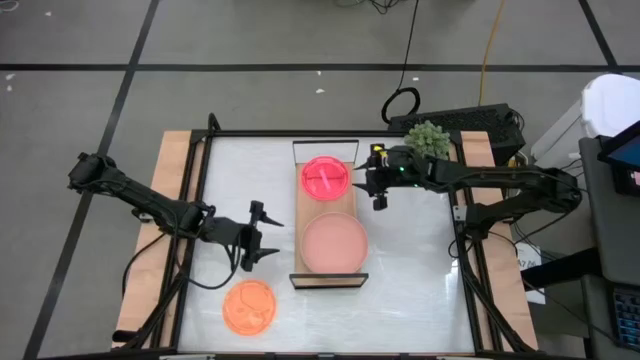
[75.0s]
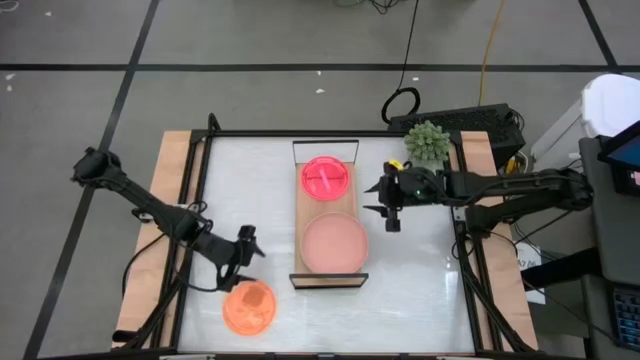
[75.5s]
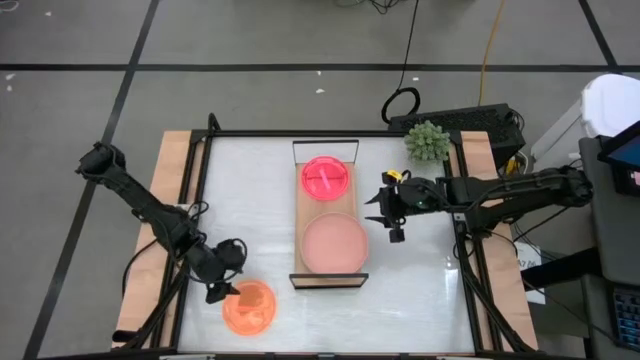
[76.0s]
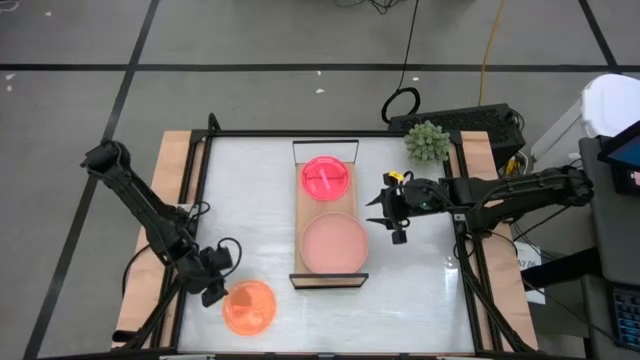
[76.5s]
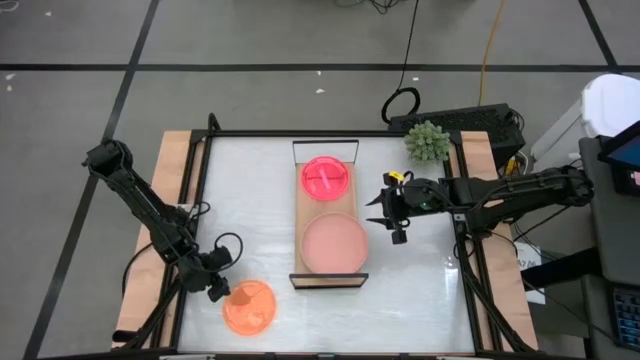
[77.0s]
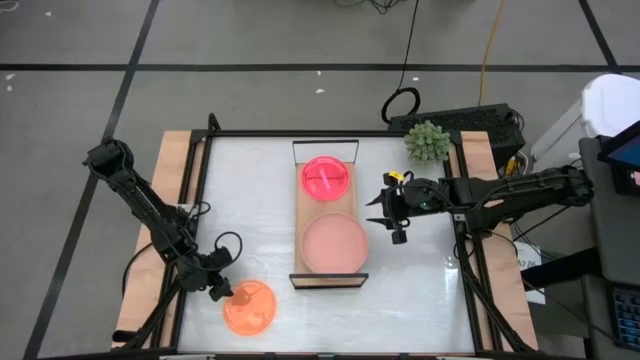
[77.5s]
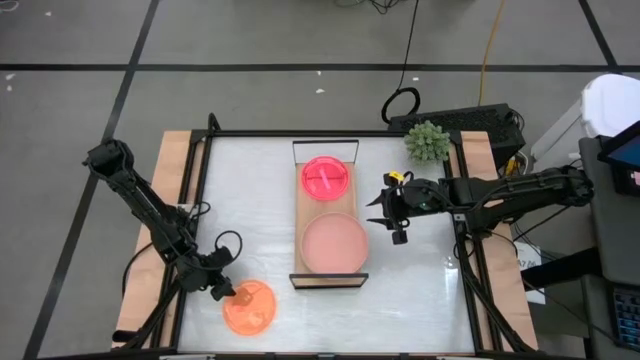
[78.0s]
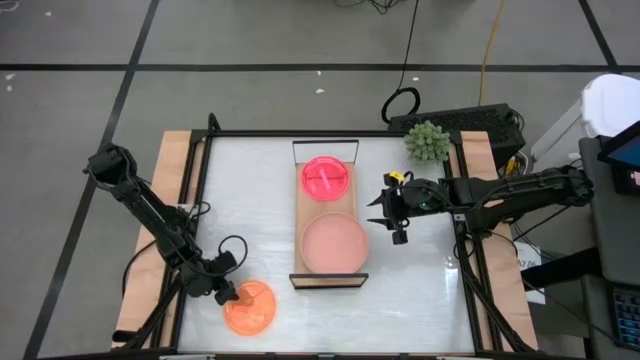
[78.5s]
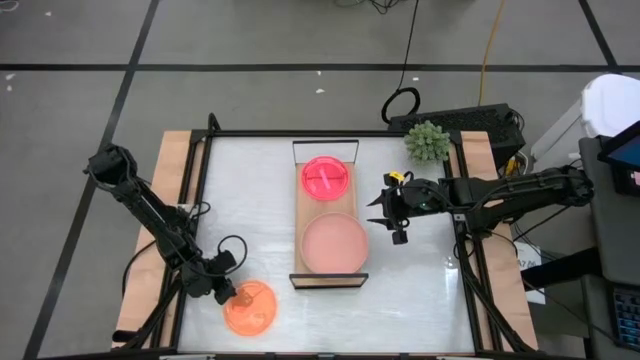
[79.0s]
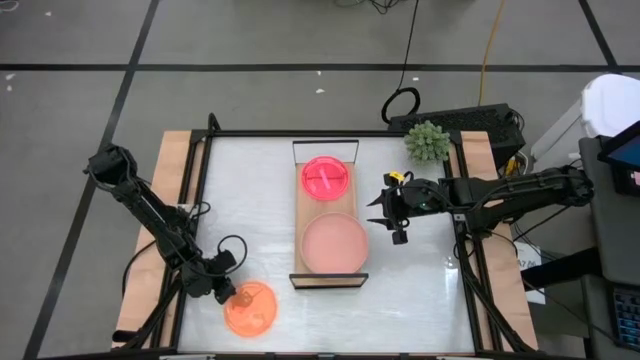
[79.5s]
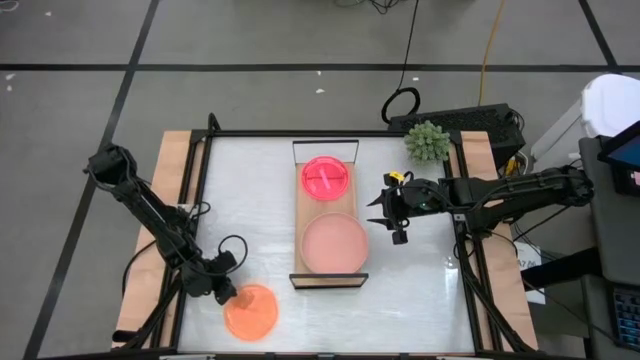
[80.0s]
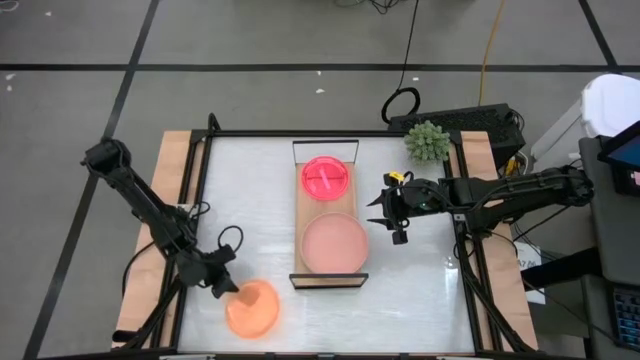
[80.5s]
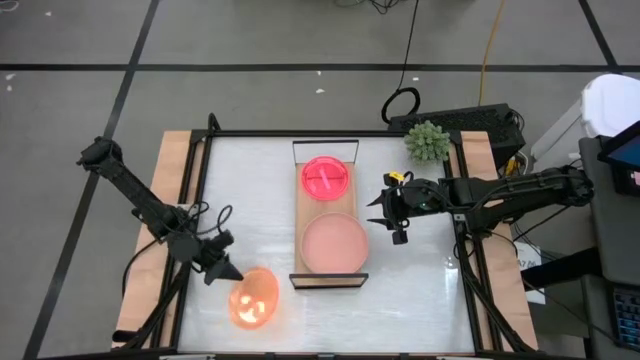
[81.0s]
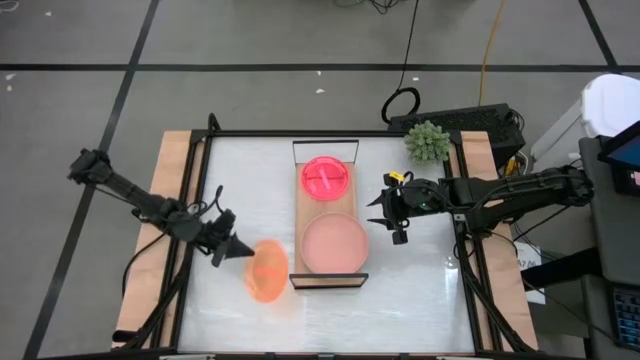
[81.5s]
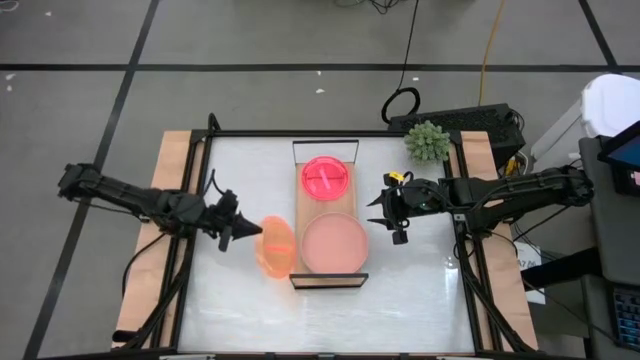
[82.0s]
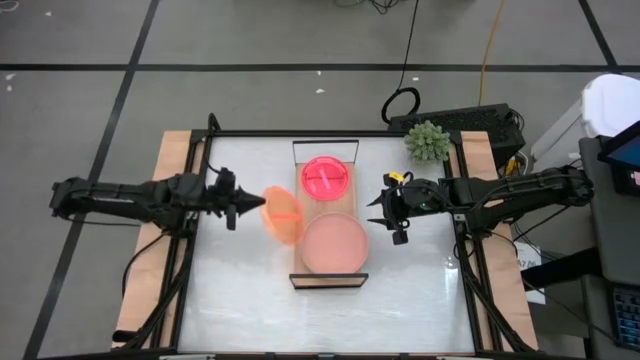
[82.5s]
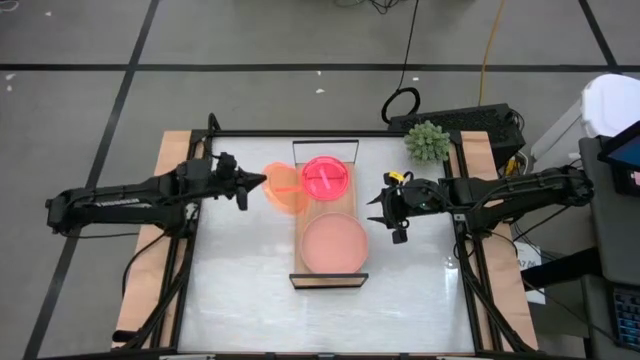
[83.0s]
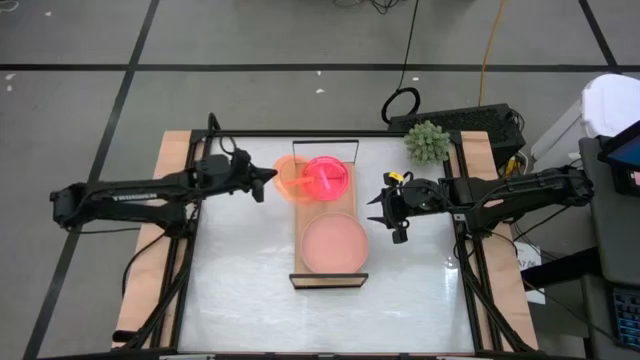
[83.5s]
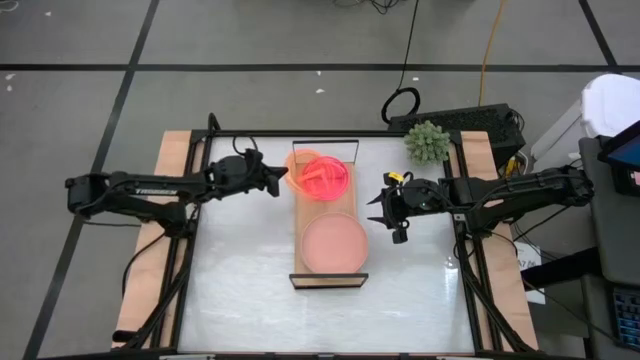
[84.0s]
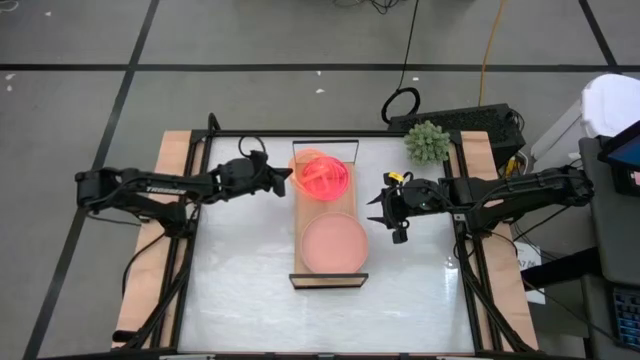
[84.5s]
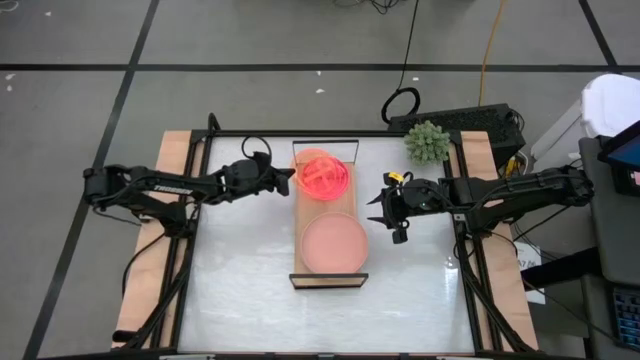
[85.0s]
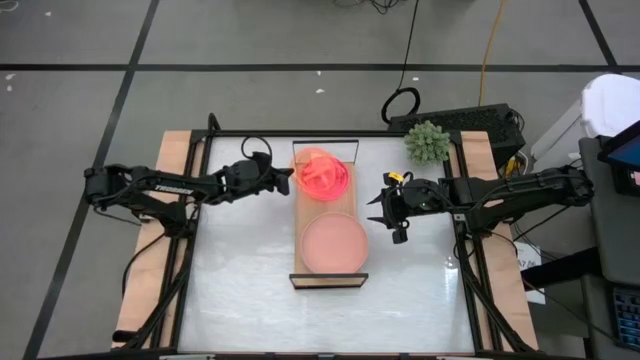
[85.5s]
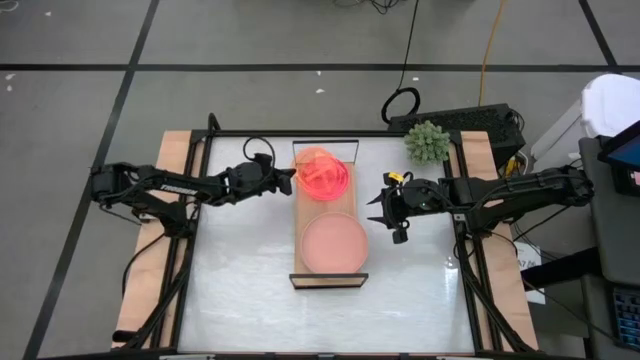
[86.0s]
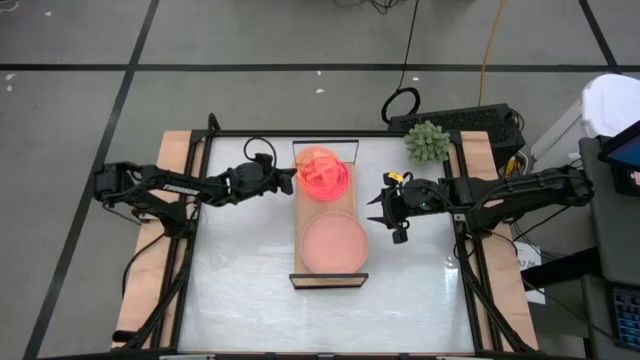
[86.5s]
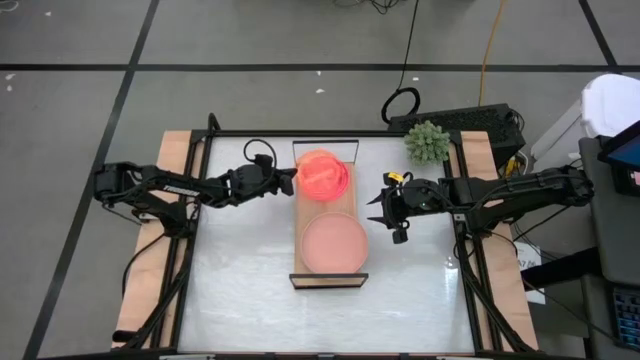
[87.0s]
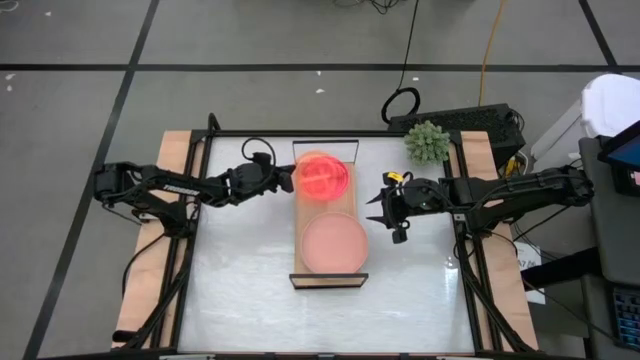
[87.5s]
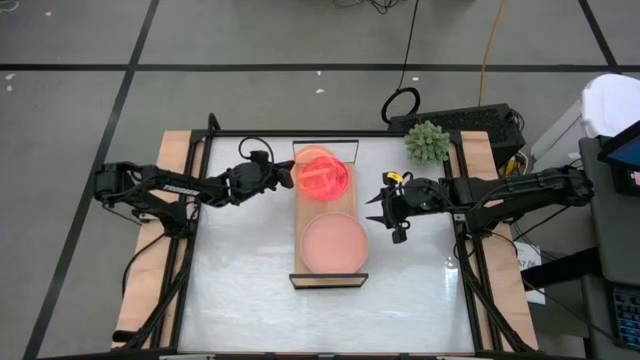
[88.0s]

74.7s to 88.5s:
Task: Place and stack plates onto a shelf
Stack the orange plate on top of the pink plate on the shelf

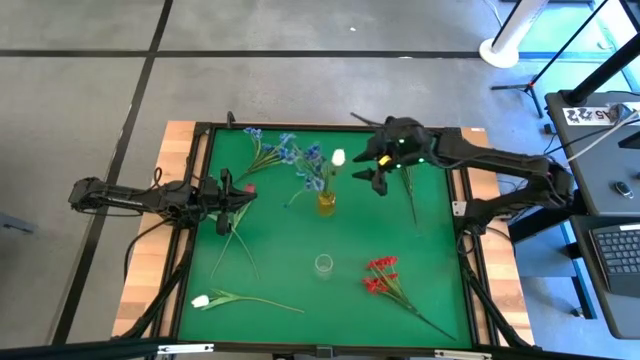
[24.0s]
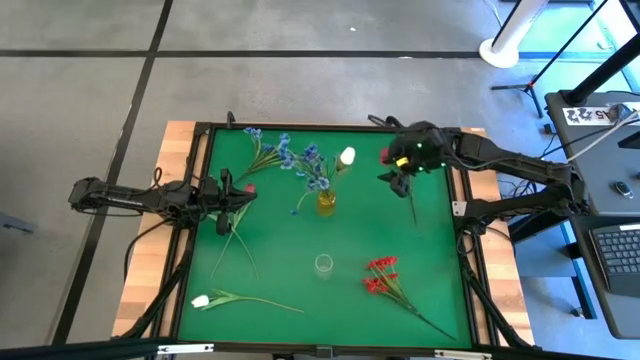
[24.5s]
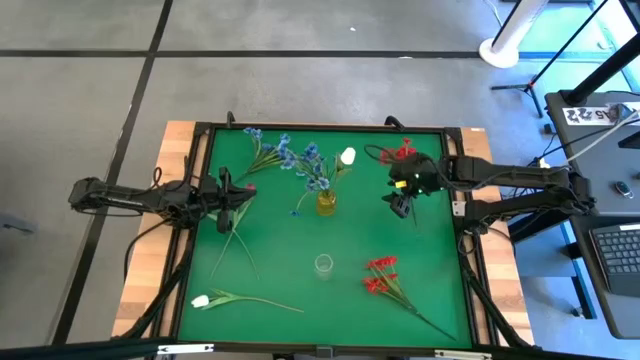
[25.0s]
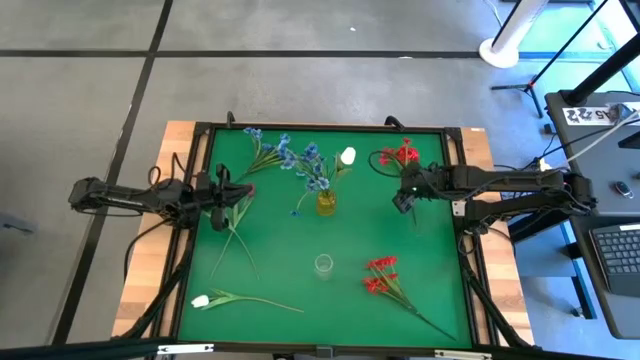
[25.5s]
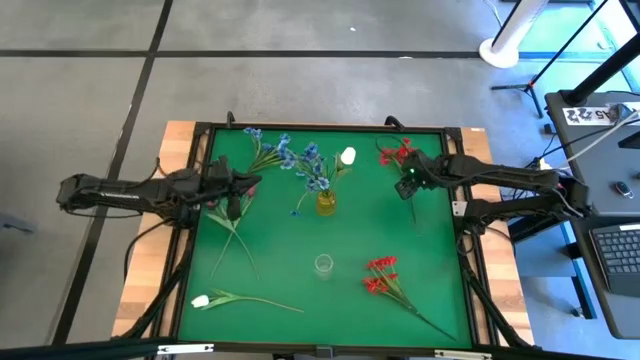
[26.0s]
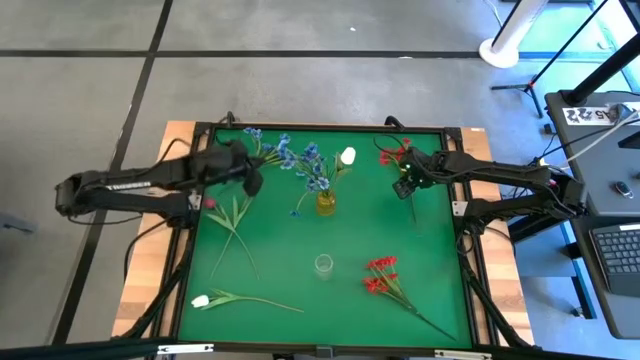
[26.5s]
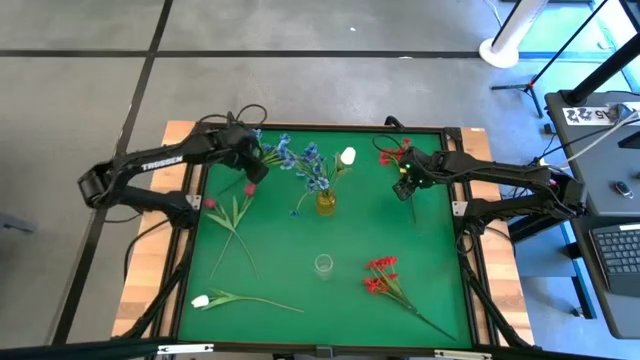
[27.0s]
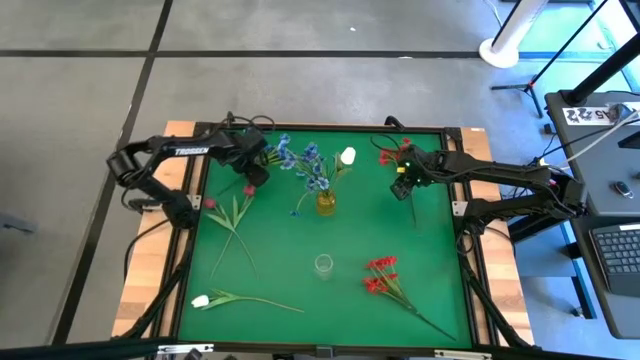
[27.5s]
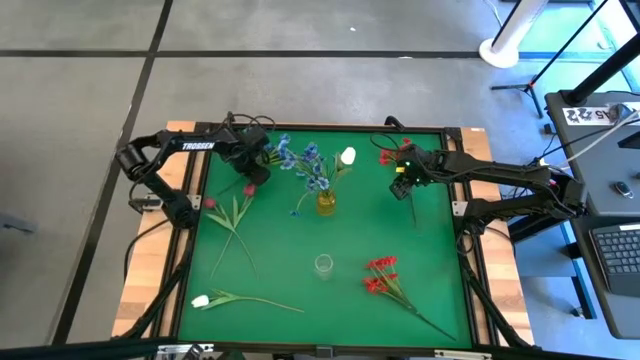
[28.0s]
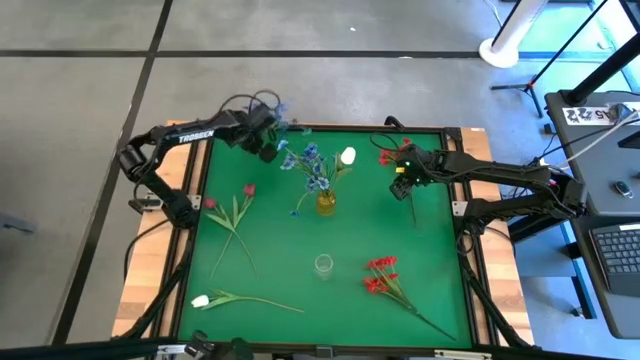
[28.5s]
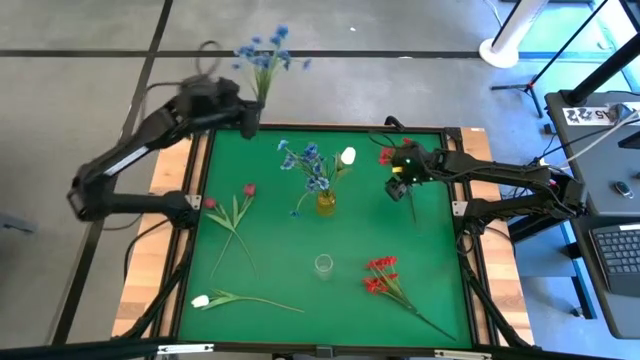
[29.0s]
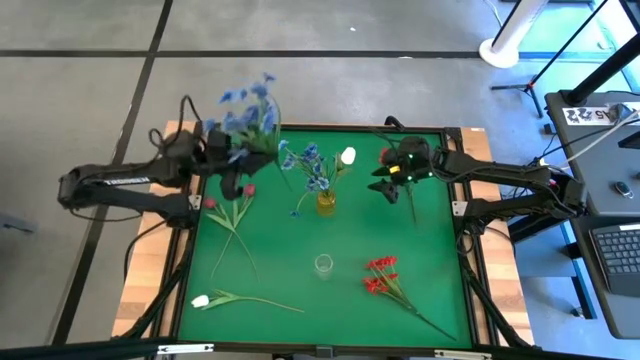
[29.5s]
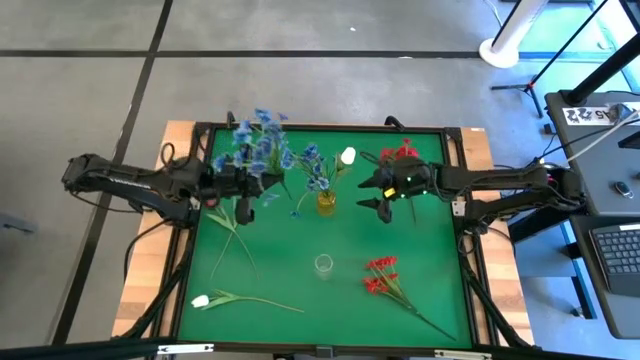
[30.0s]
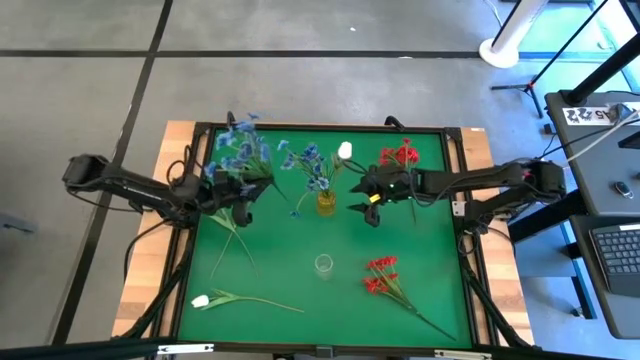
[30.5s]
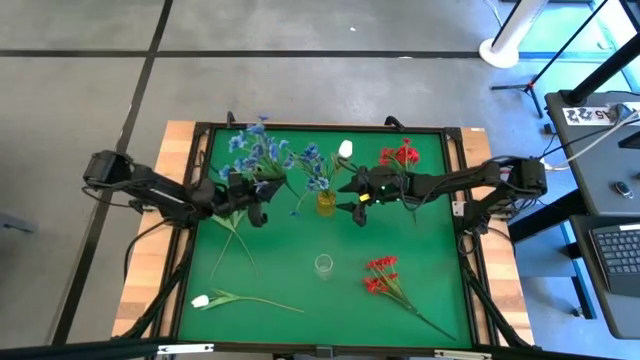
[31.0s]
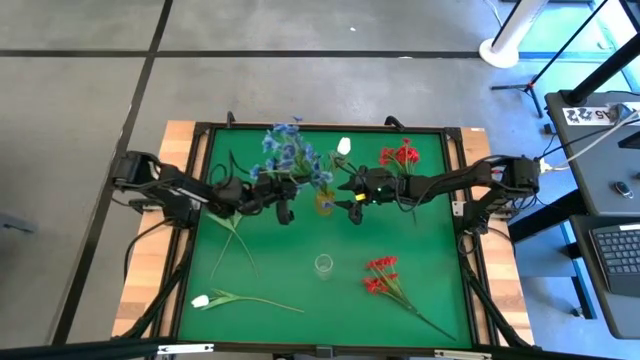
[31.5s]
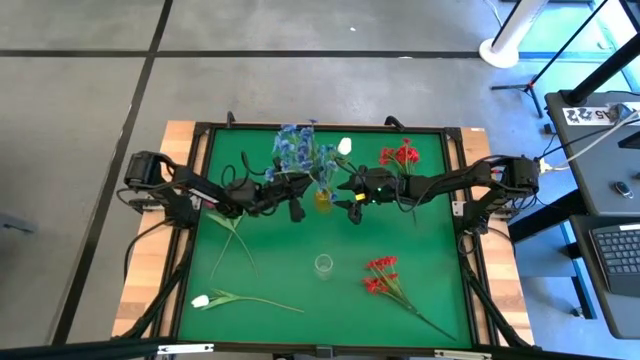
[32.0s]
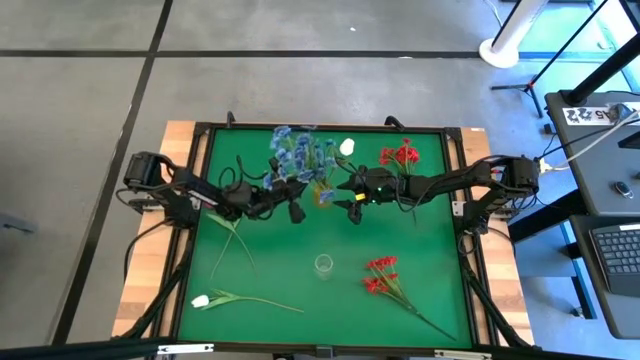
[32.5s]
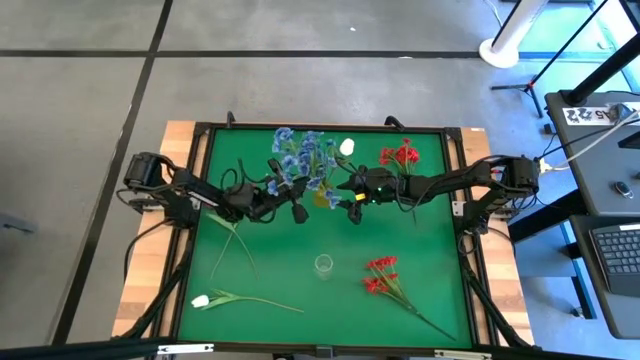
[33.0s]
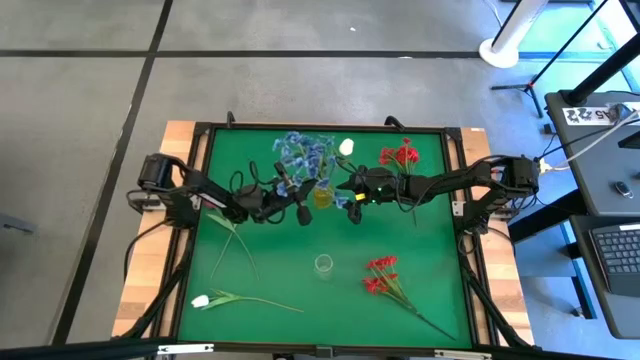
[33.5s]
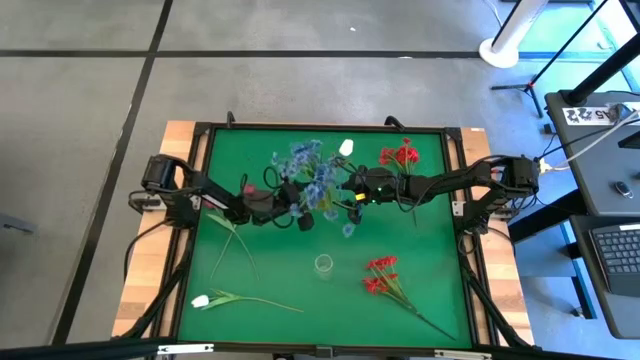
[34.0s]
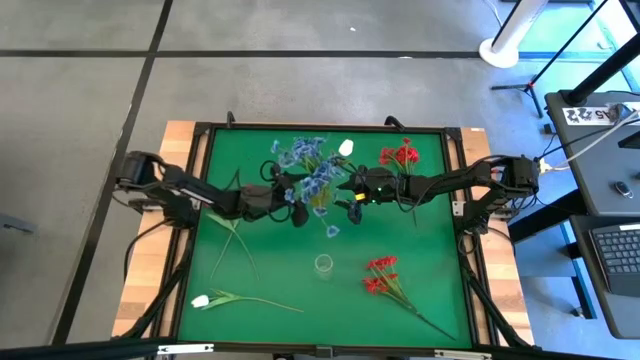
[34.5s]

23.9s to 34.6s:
Task: Sort flowers into vase by color
Put the blue flowers into the yellow flower vase
